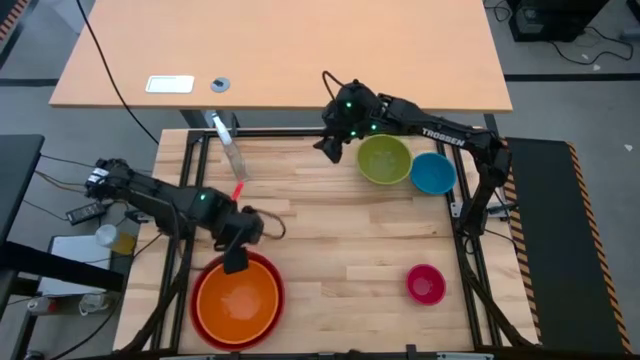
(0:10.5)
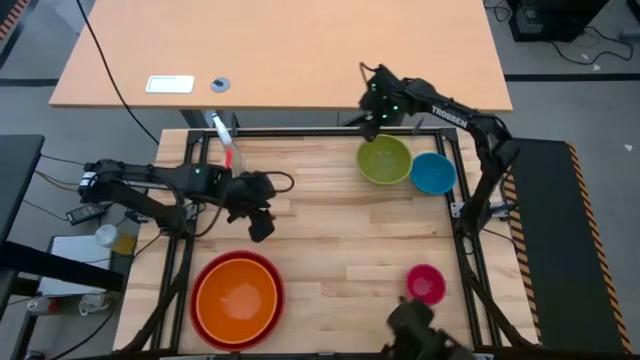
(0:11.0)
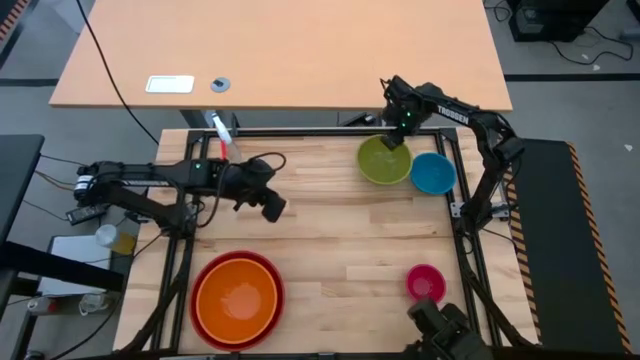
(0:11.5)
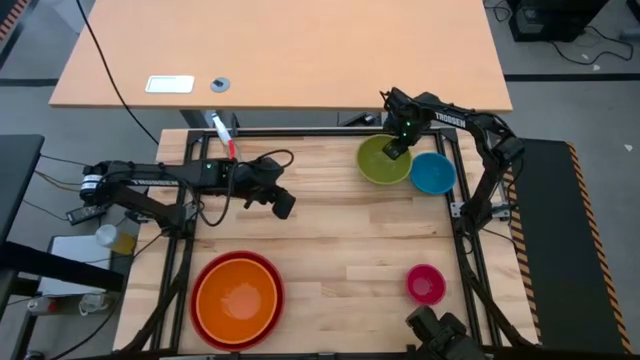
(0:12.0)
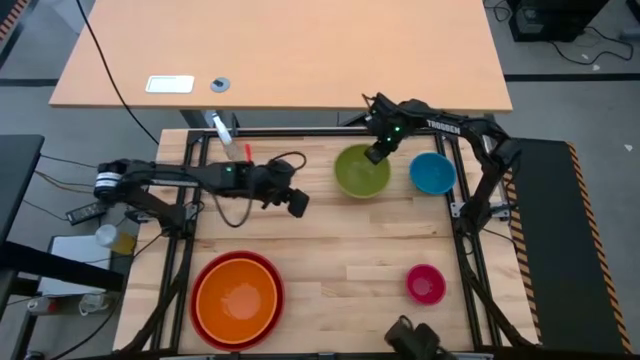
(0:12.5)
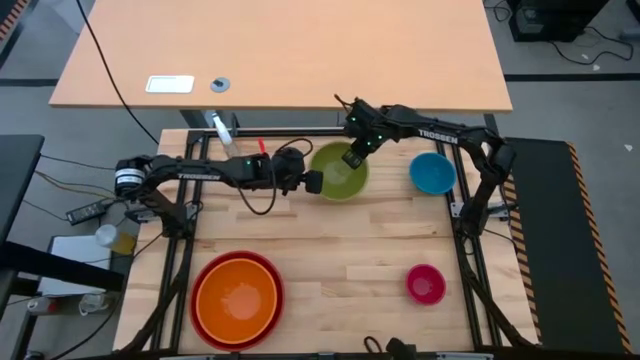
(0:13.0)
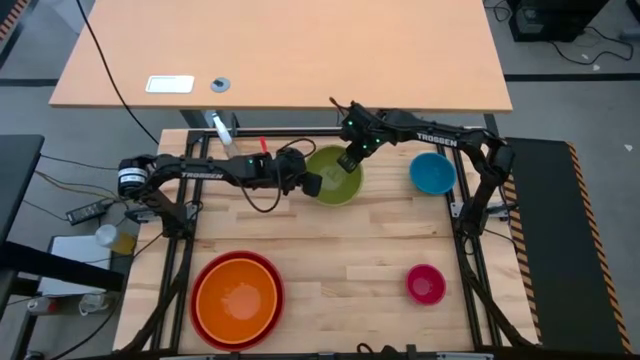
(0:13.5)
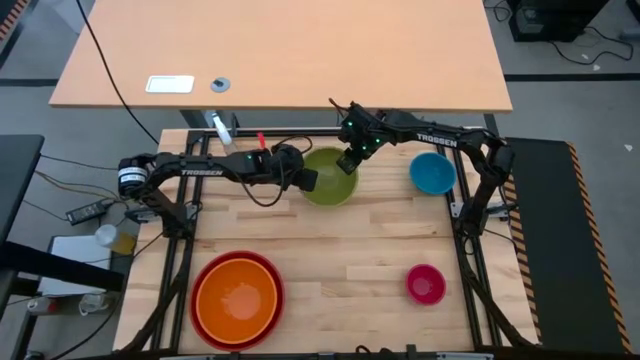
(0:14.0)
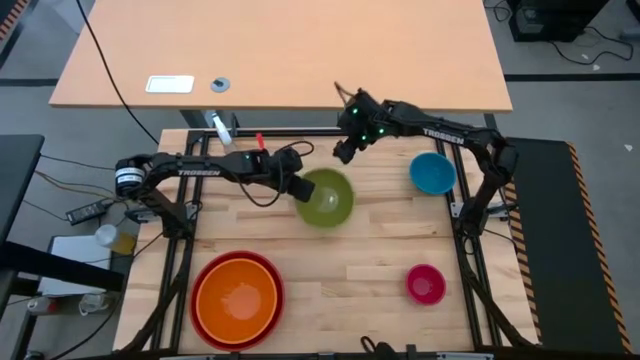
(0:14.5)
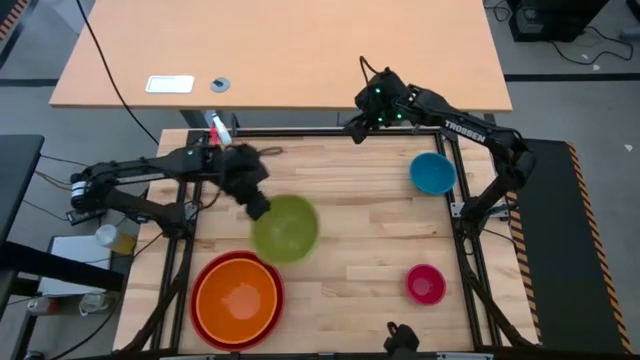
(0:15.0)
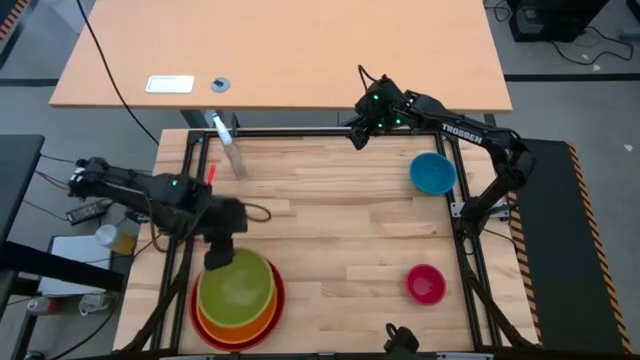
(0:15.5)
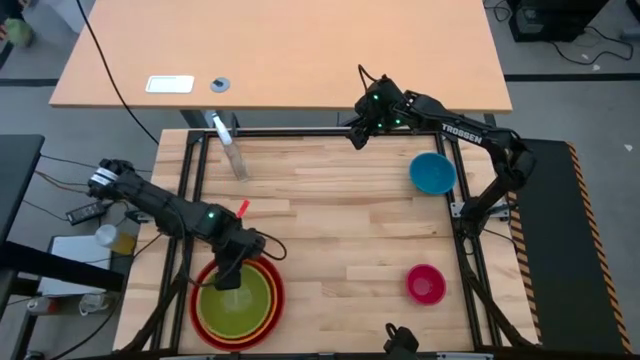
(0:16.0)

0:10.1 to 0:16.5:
Stack the green bowl into the orange bowl

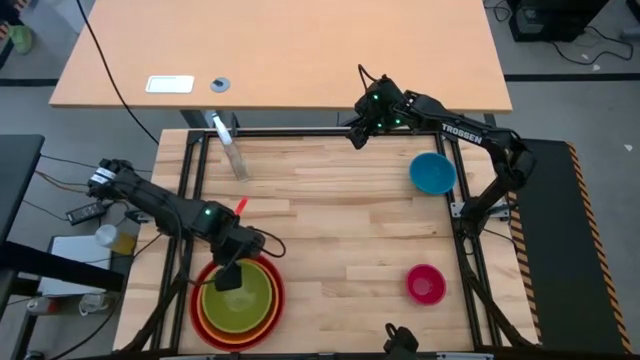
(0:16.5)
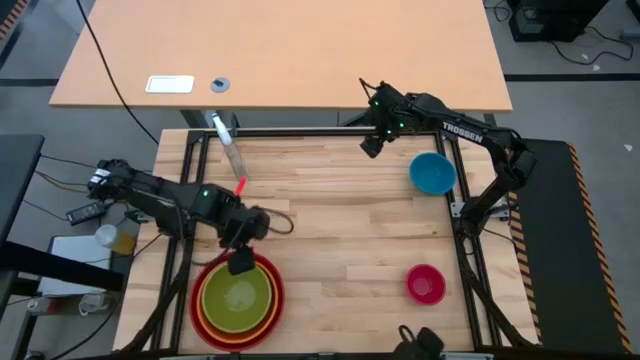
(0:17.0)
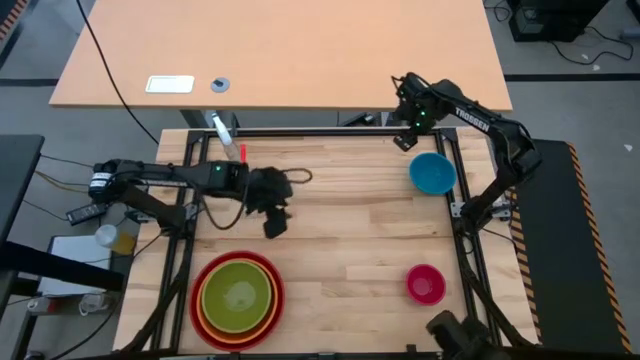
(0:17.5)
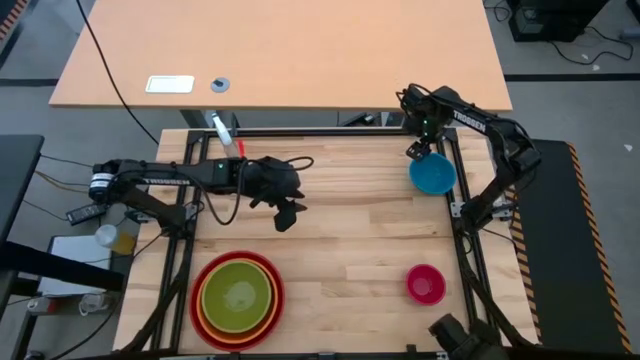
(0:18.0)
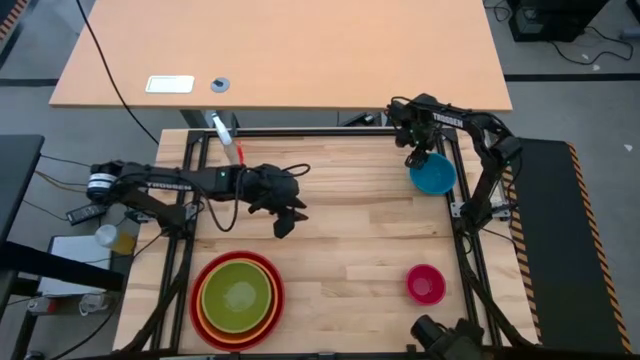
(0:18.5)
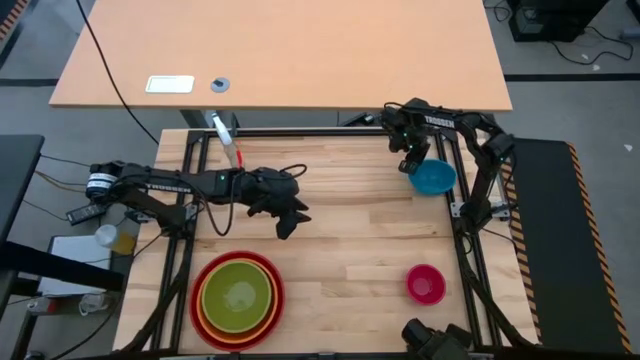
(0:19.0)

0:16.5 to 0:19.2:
Stack the blue bowl into the green bowl

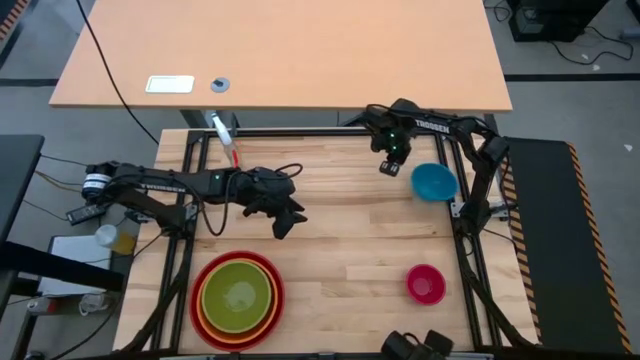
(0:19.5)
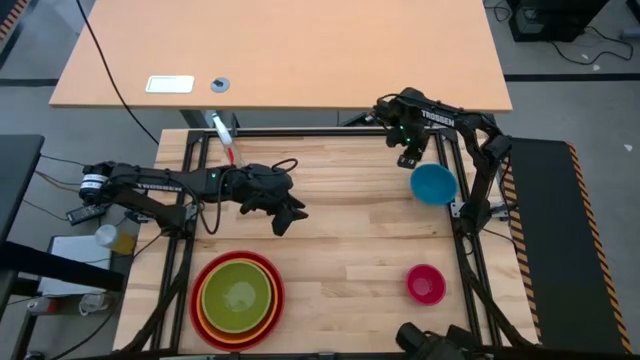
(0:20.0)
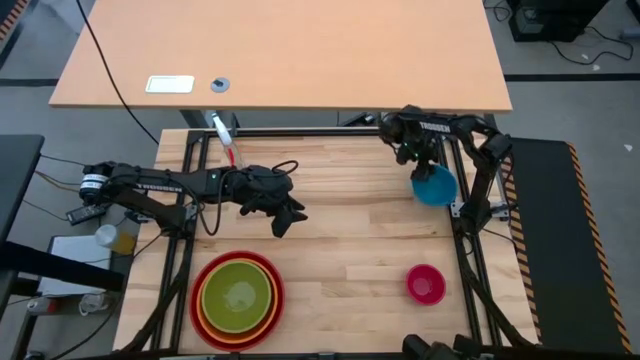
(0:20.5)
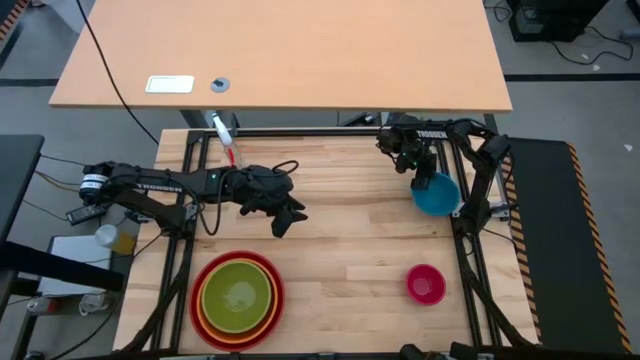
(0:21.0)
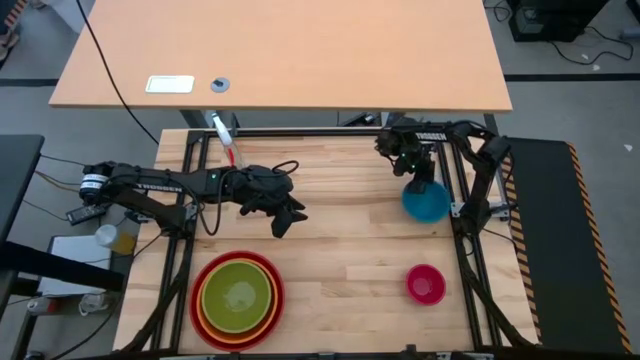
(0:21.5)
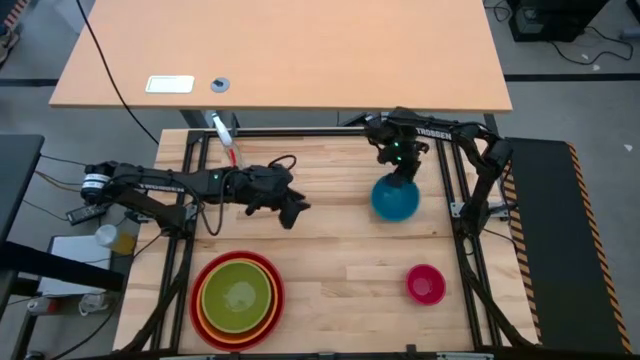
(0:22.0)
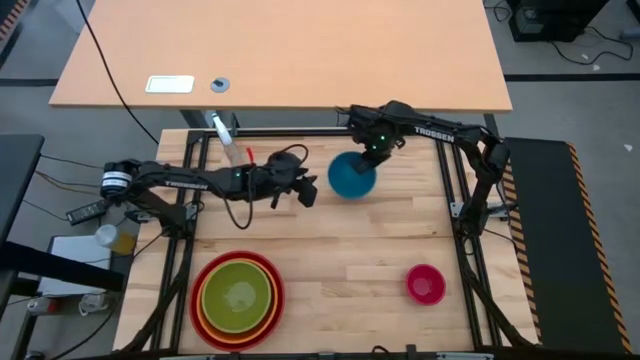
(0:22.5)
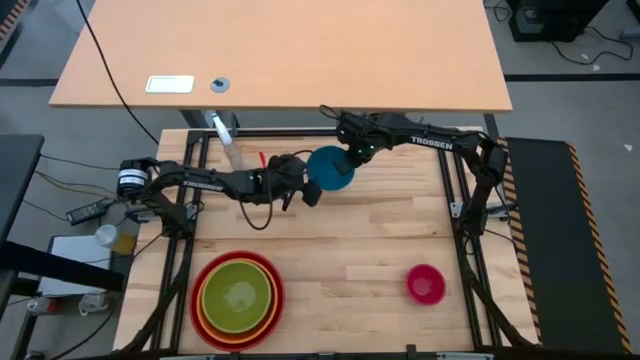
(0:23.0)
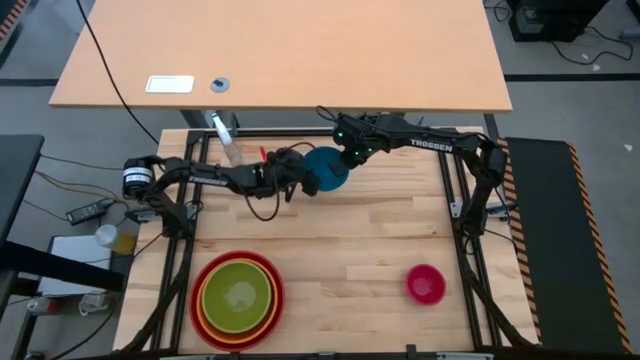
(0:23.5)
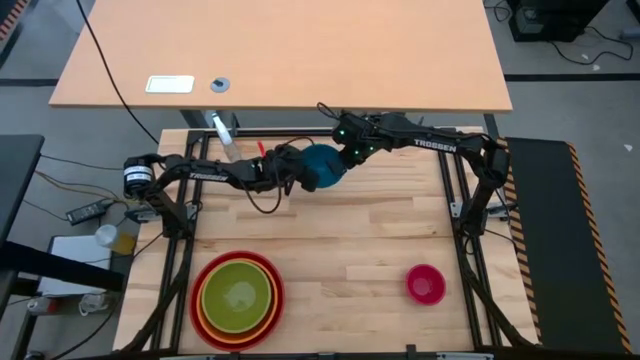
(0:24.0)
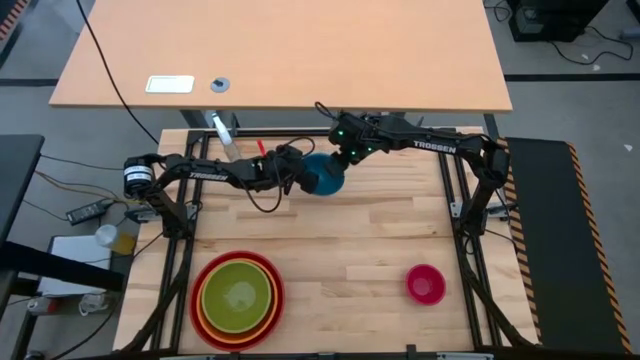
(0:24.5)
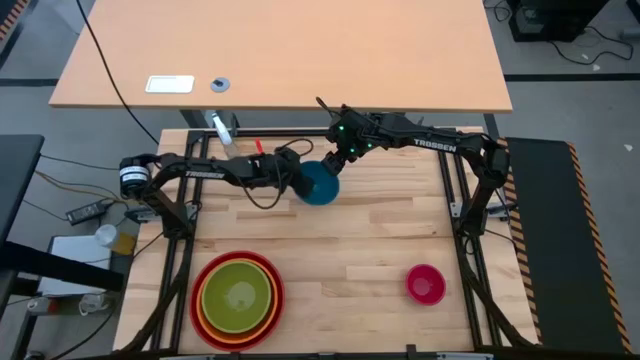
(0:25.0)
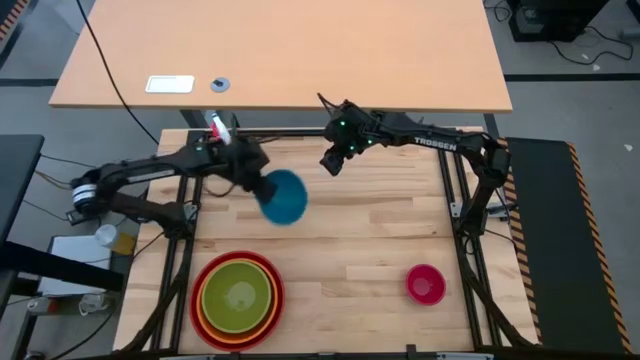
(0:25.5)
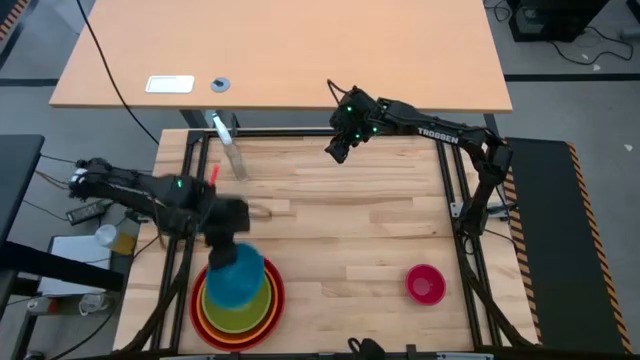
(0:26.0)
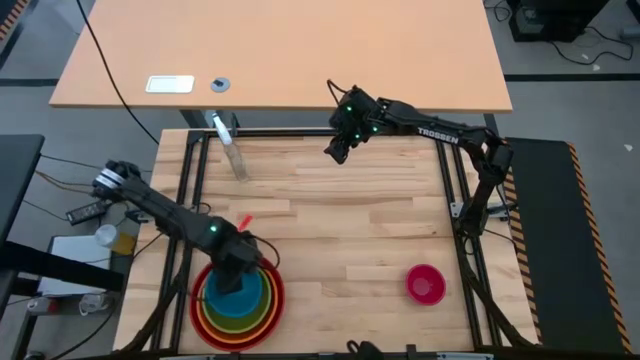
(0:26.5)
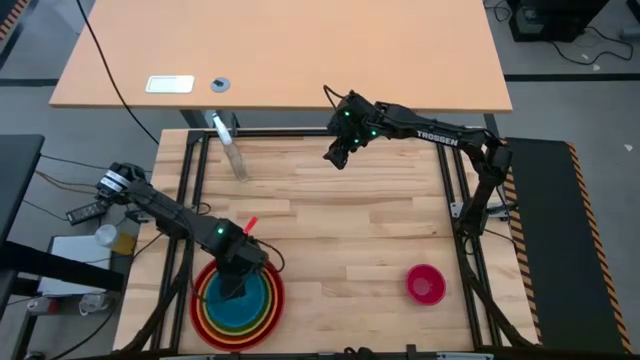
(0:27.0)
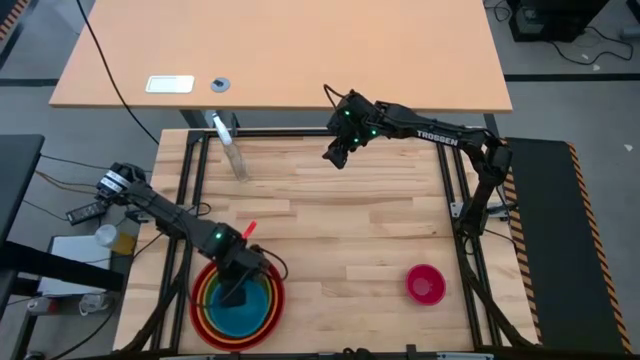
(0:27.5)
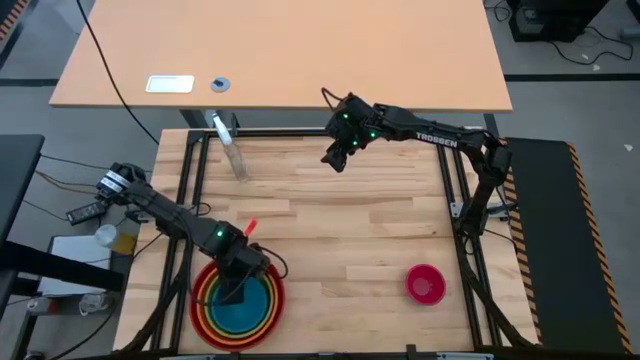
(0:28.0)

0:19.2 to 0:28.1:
Stack the blue bowl into the green bowl

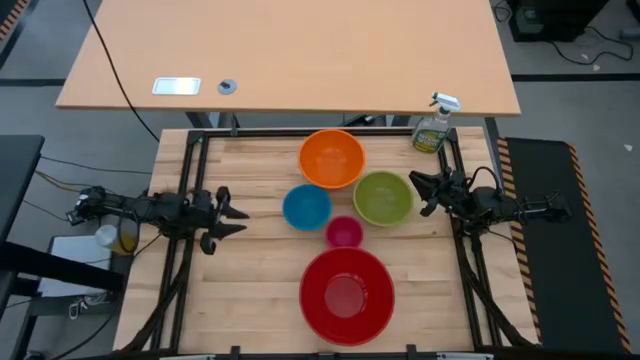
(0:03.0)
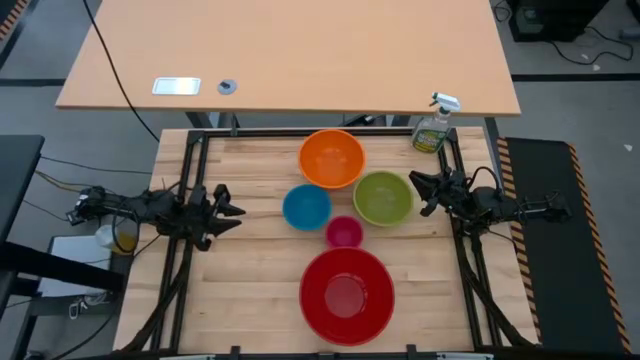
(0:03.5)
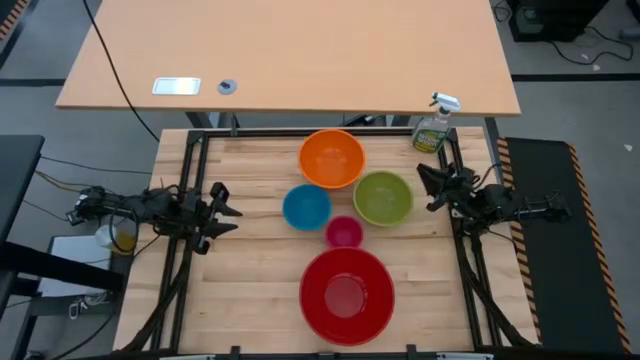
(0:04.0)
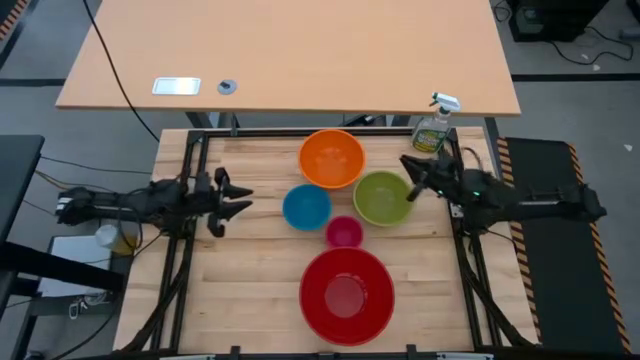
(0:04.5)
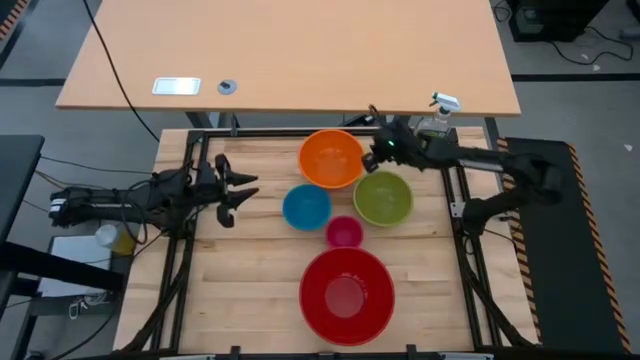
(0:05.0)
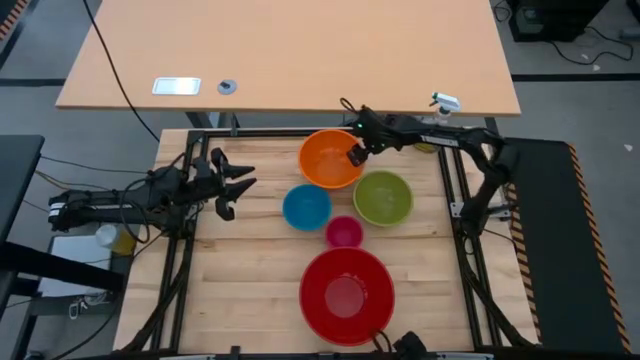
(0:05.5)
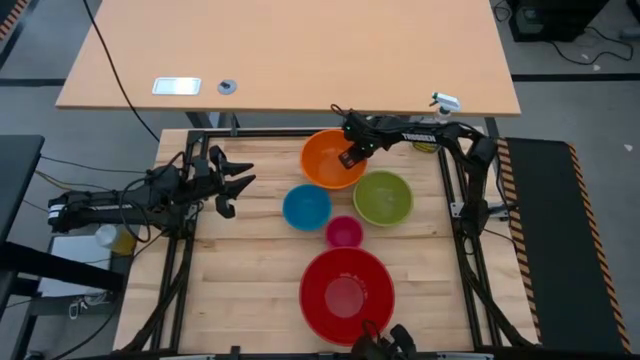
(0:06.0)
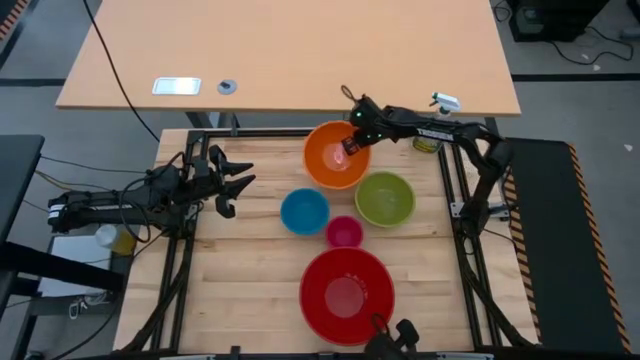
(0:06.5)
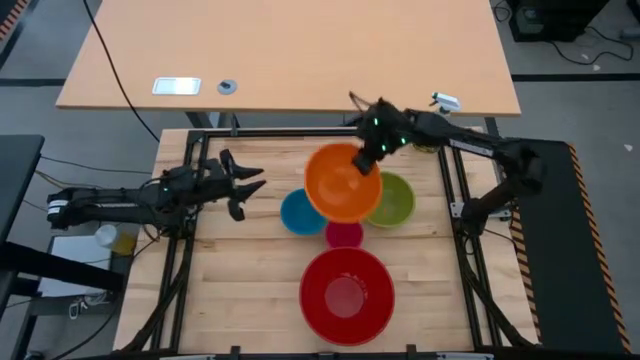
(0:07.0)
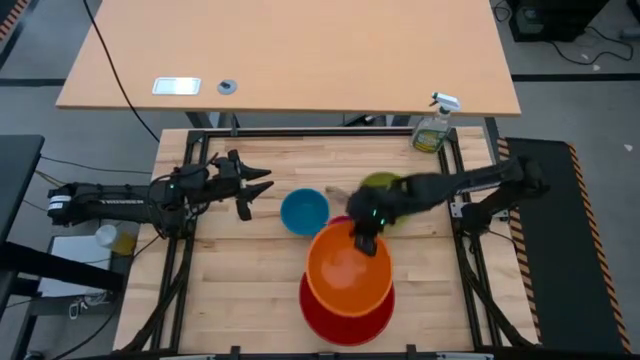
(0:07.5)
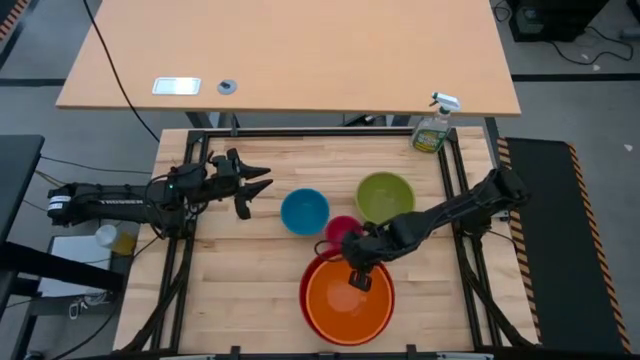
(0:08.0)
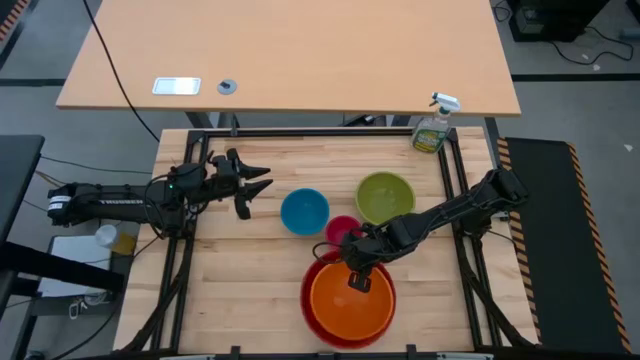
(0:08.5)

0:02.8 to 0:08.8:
Stack the orange bowl on top of the red bowl
